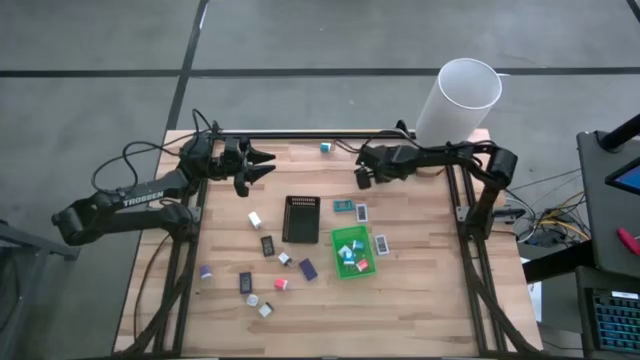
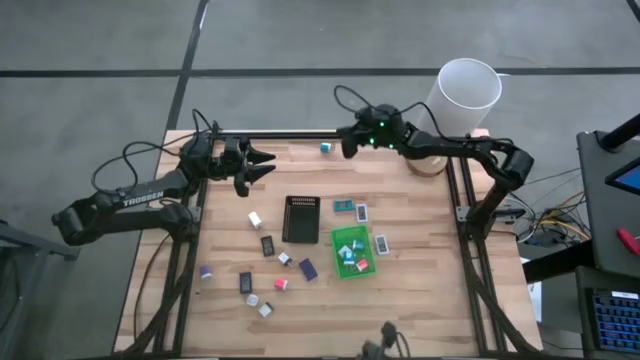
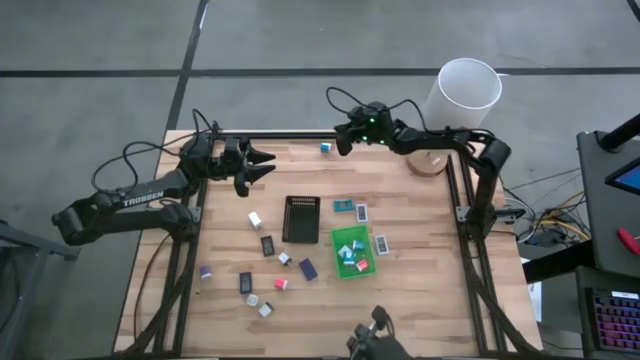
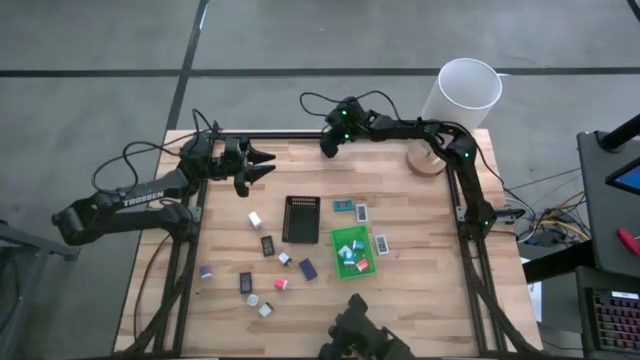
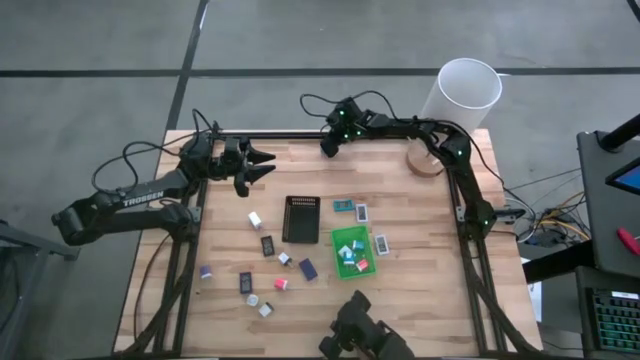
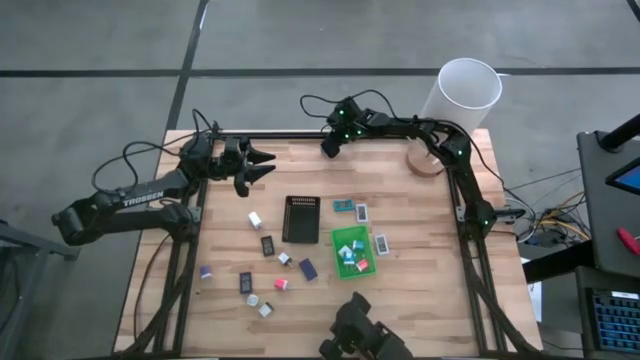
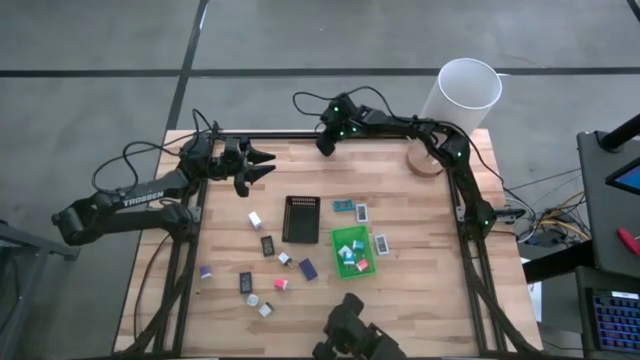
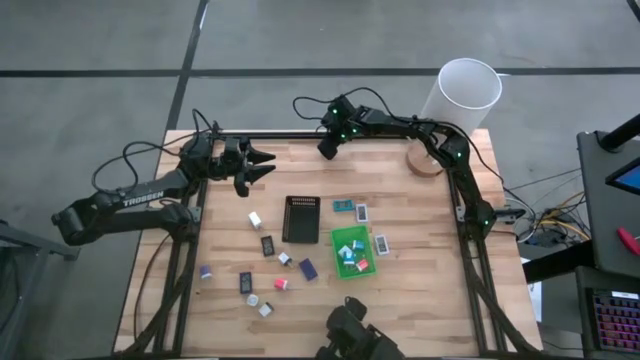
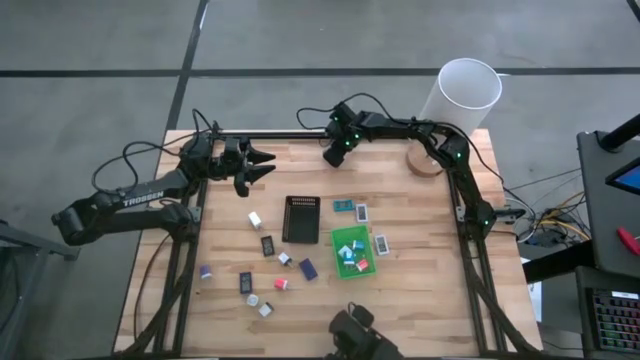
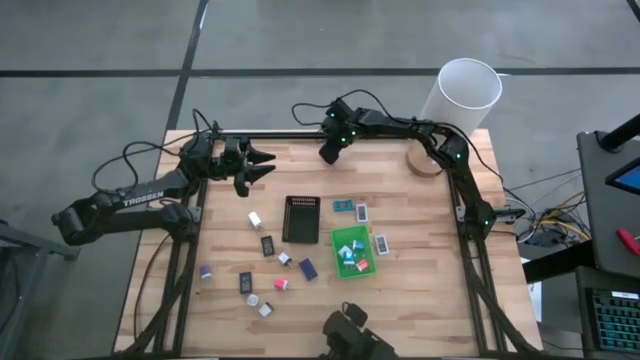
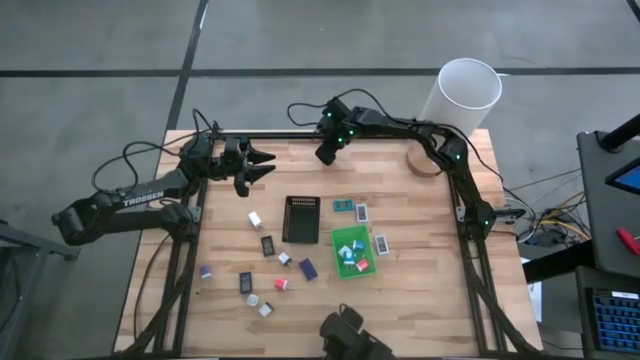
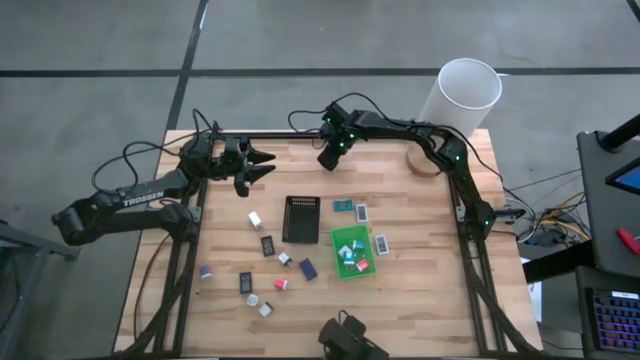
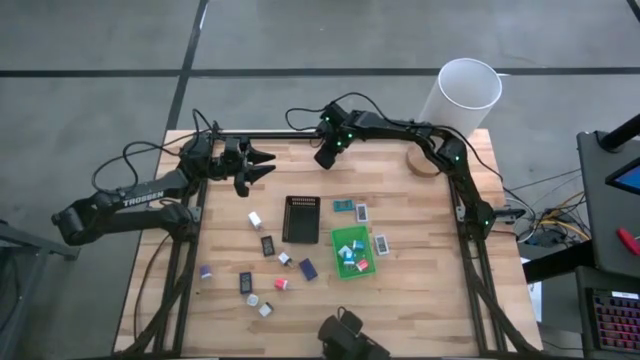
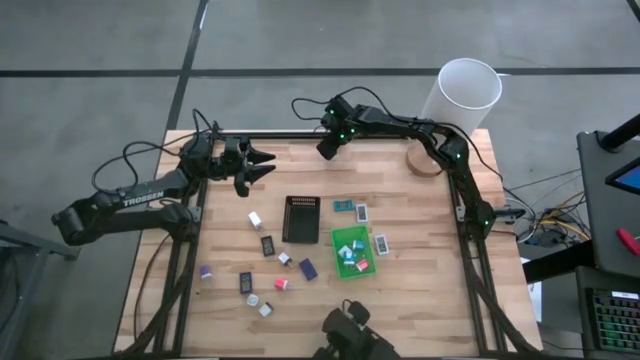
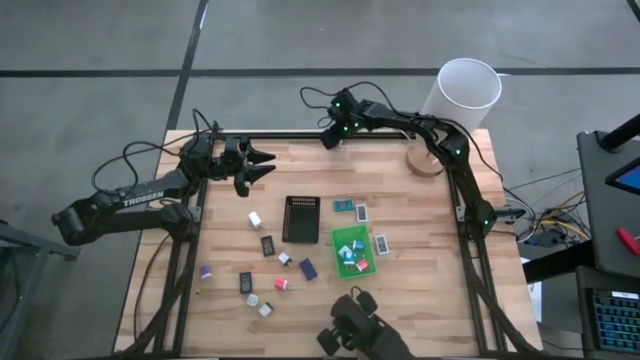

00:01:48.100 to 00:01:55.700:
Task: Pick & Place Office items
Put the blue charger adapter into the green bin

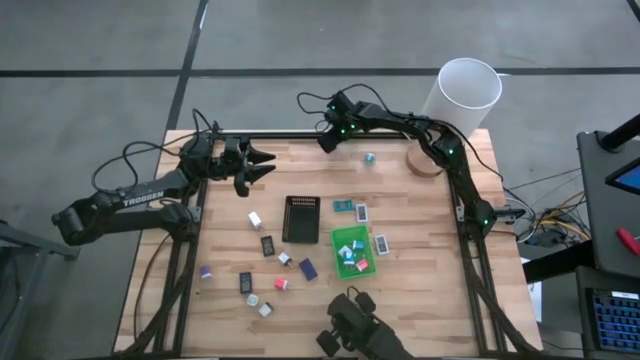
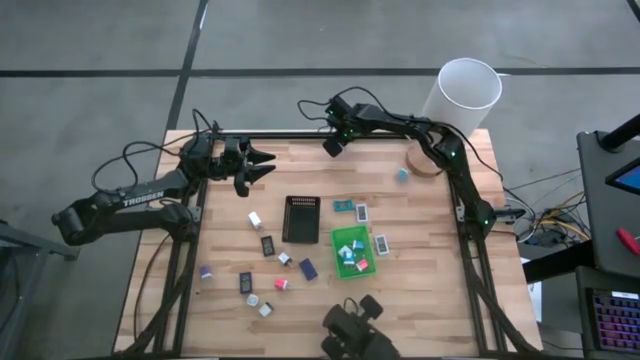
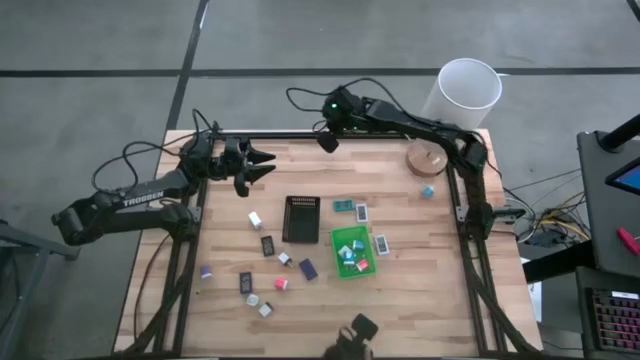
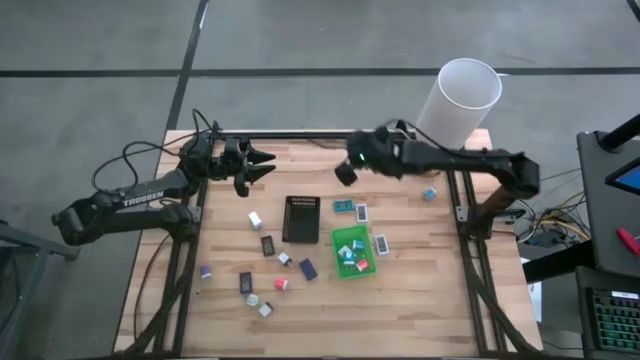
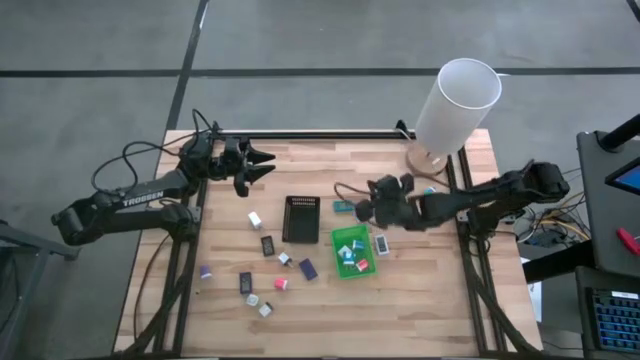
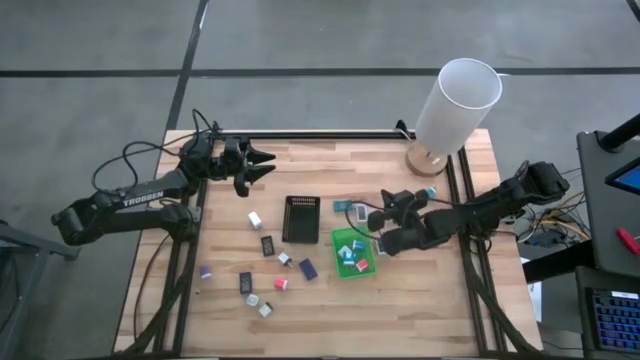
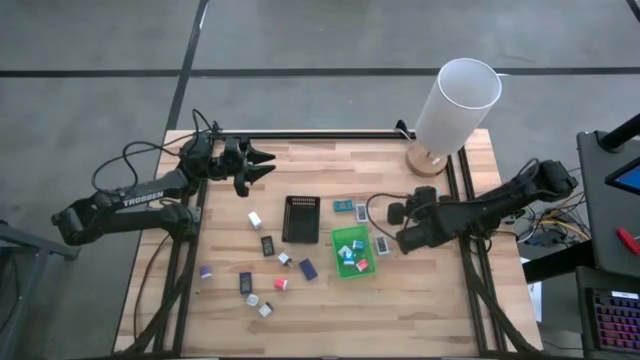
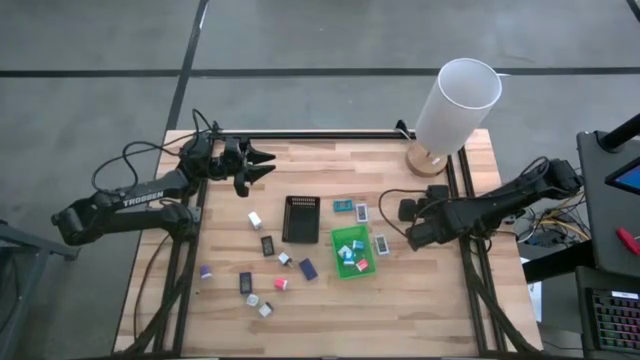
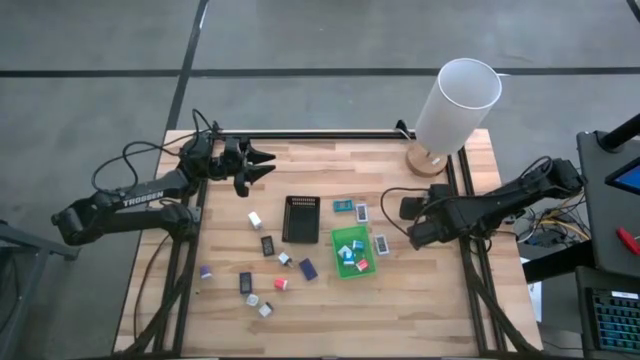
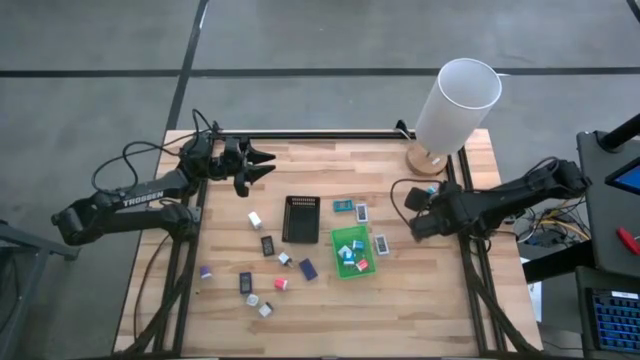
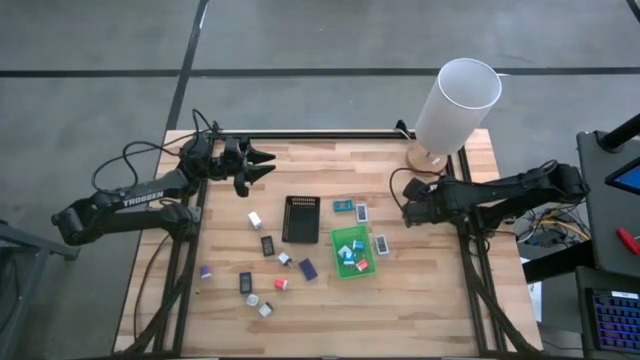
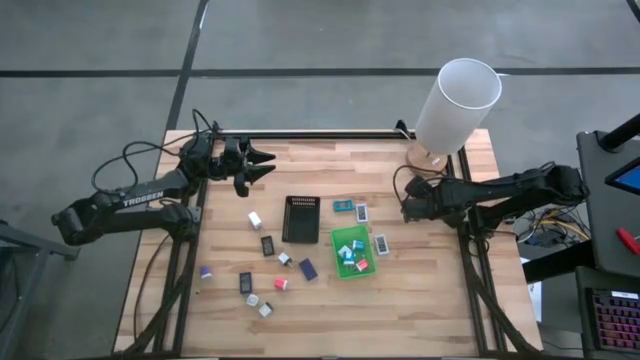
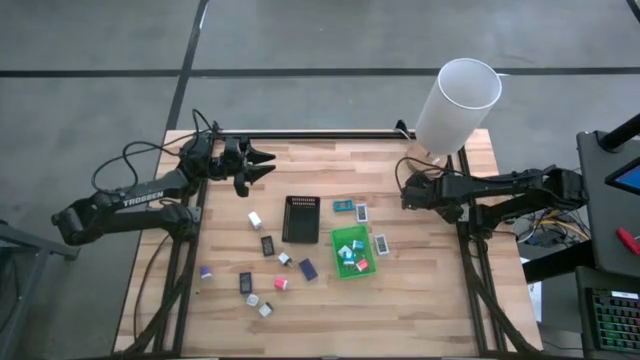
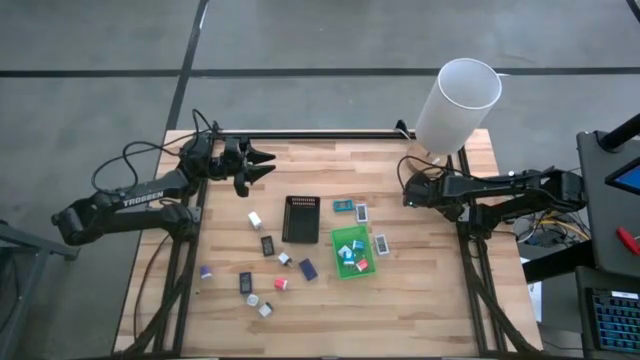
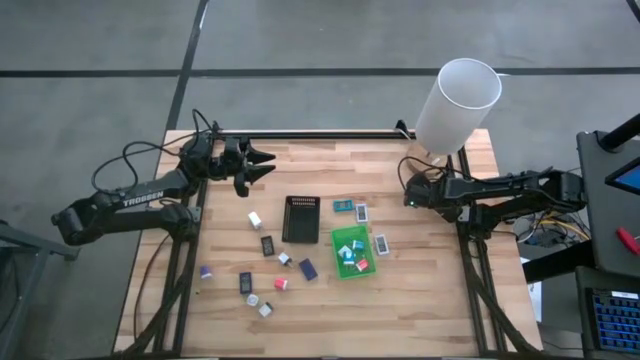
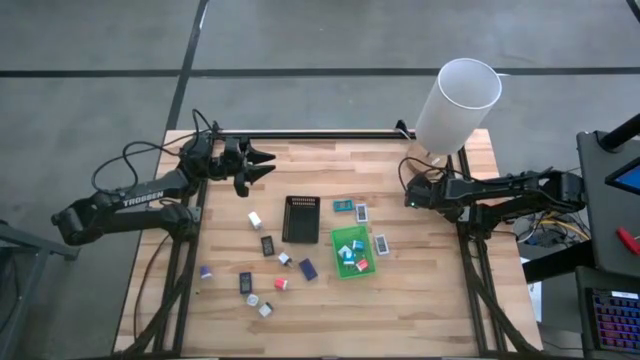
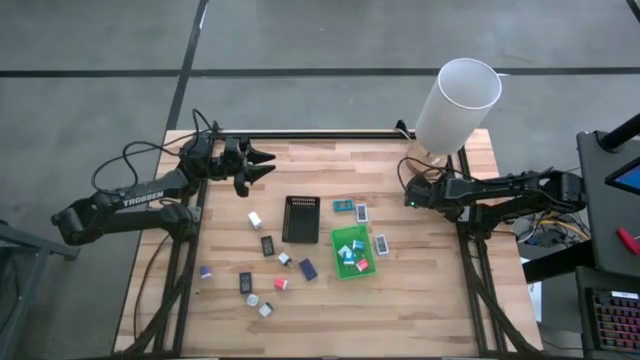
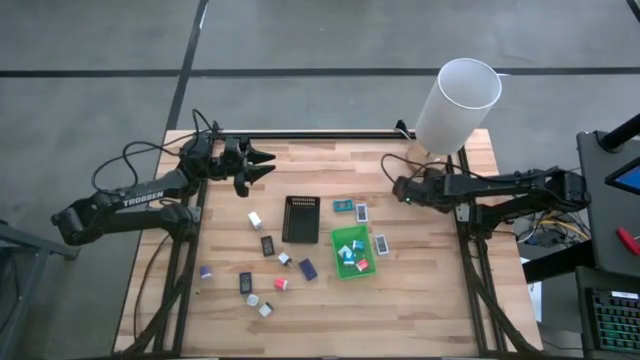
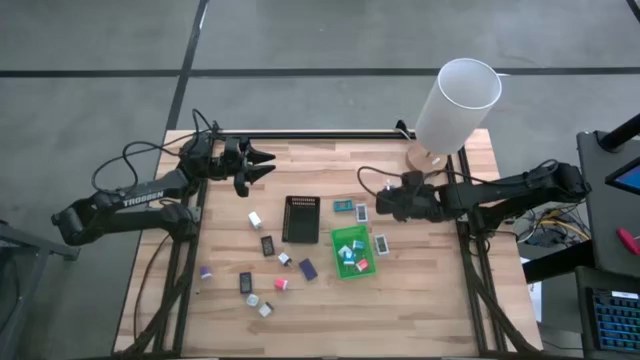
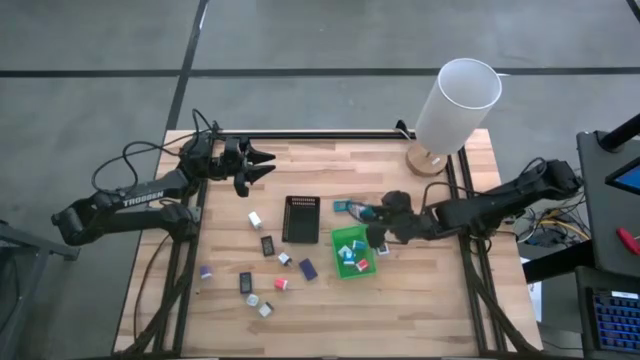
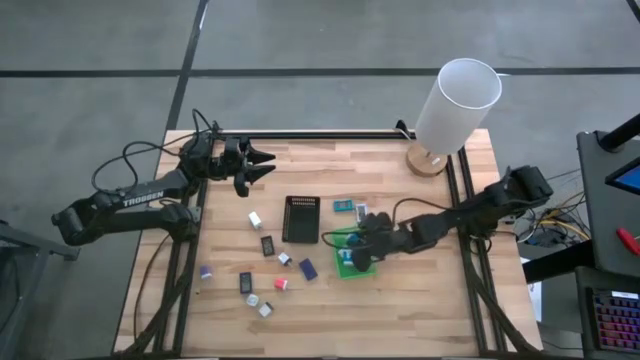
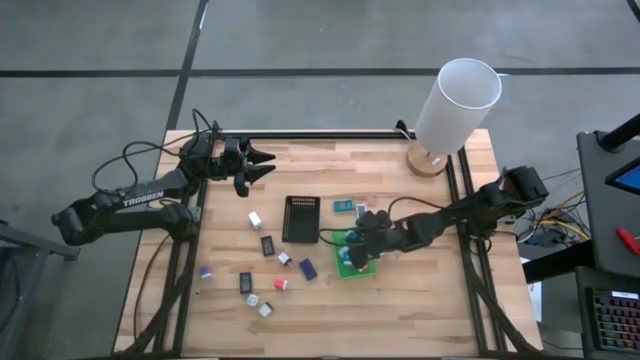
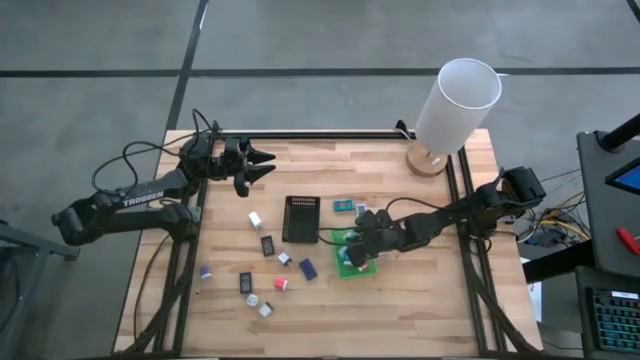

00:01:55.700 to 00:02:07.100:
Put the blue charger adapter into the green bin

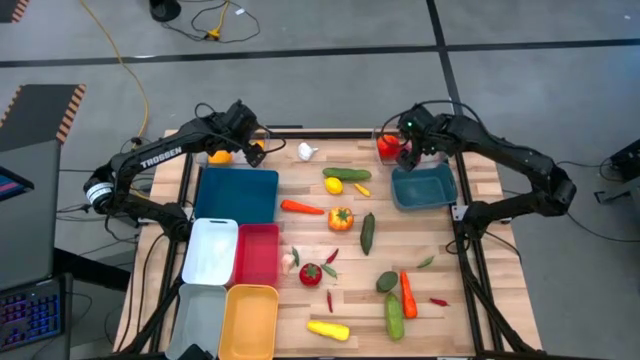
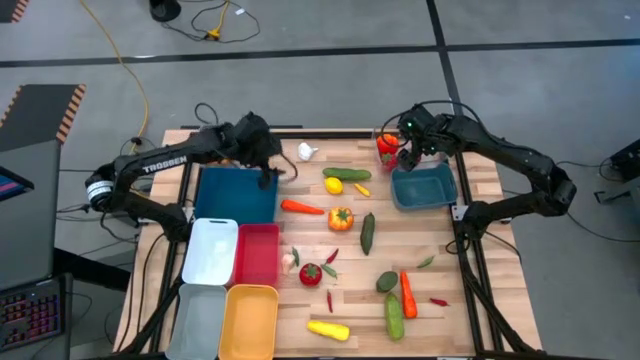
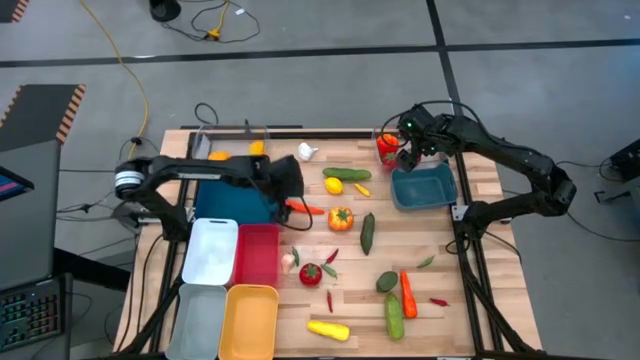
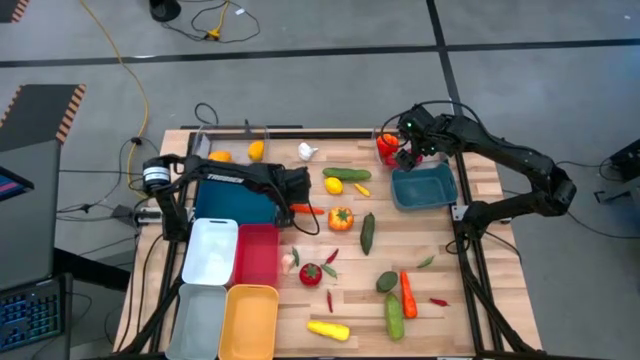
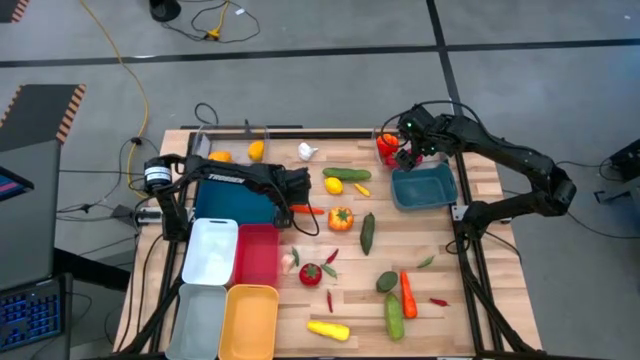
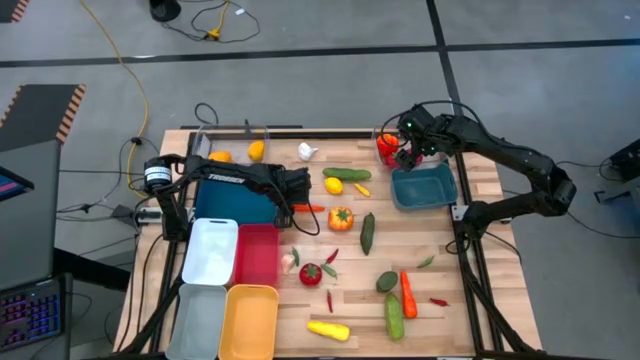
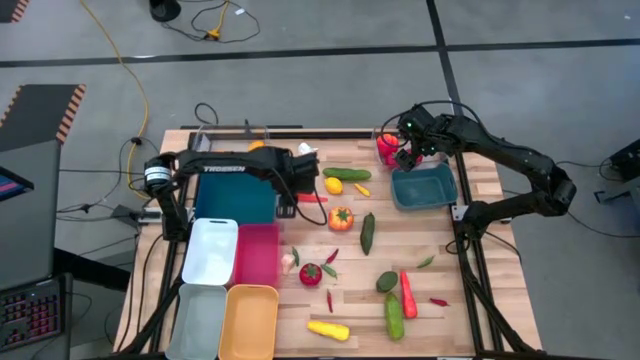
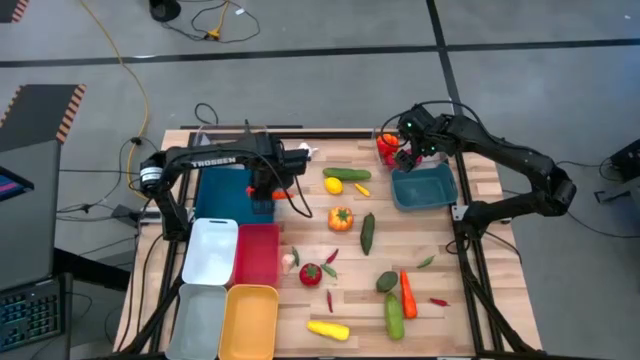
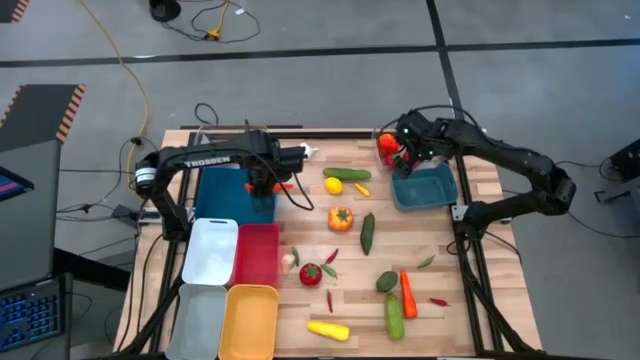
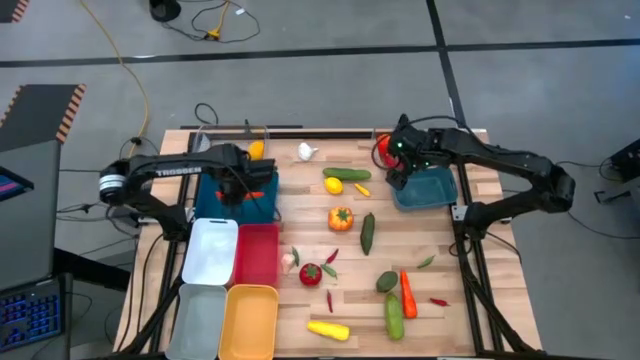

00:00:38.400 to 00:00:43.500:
Task: Sort produce into baskets
Put the top orange carrot into the blue bin
